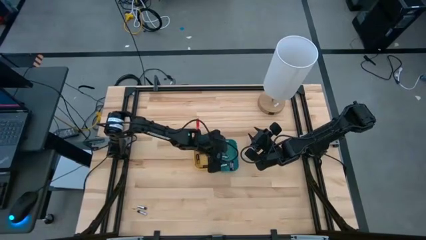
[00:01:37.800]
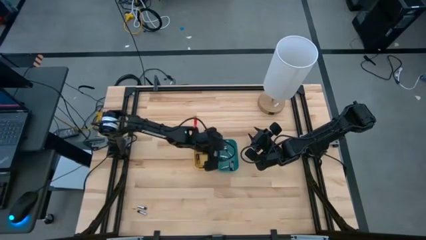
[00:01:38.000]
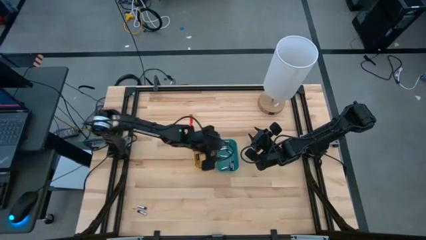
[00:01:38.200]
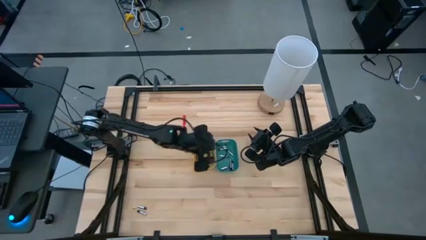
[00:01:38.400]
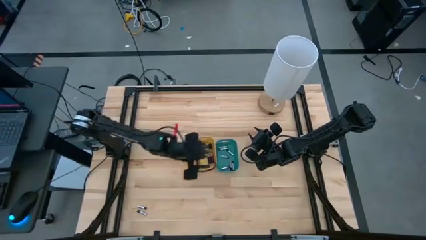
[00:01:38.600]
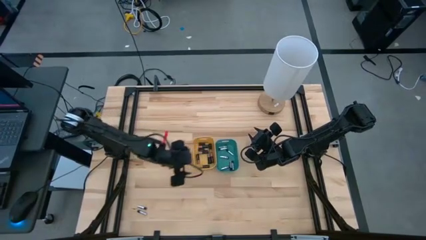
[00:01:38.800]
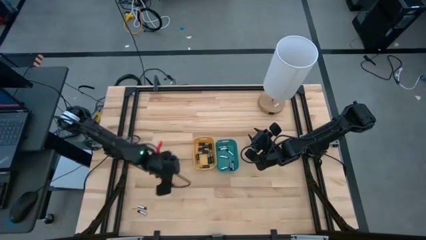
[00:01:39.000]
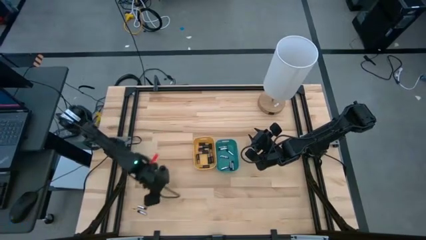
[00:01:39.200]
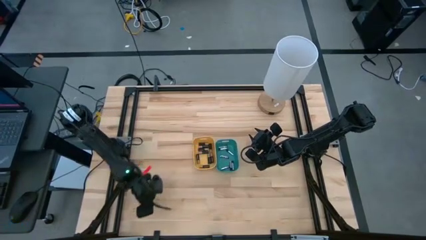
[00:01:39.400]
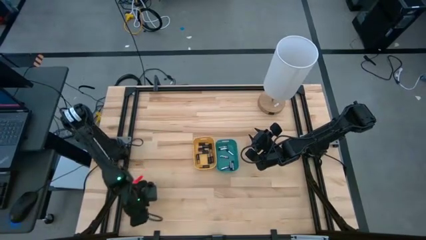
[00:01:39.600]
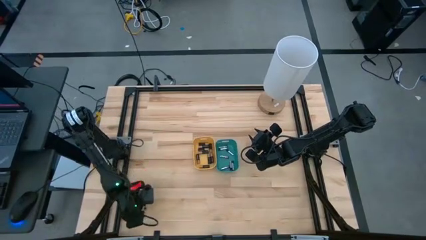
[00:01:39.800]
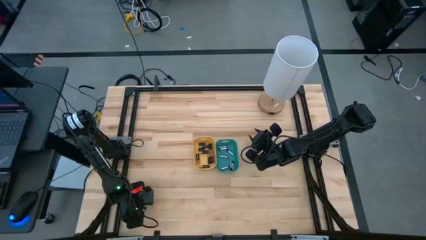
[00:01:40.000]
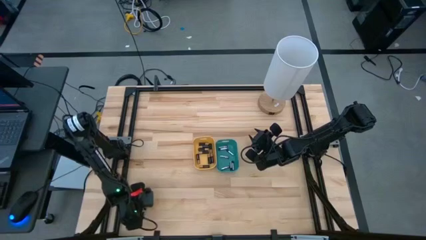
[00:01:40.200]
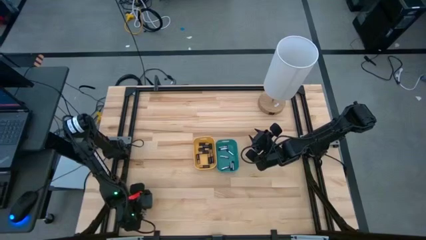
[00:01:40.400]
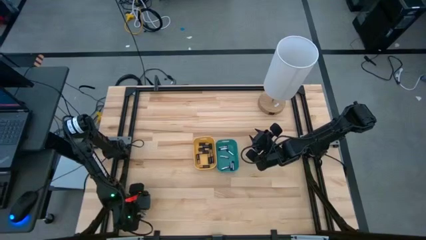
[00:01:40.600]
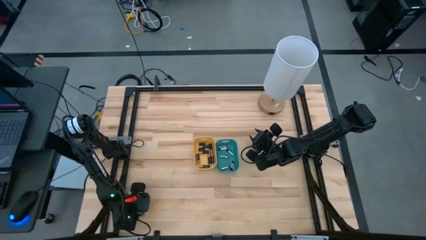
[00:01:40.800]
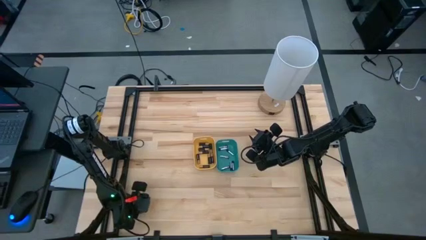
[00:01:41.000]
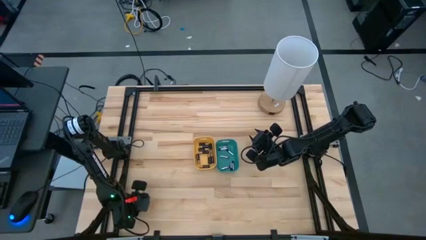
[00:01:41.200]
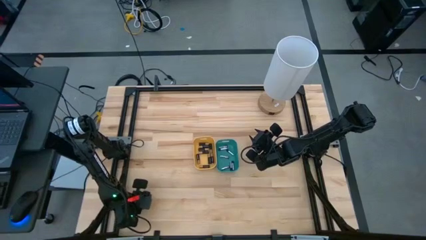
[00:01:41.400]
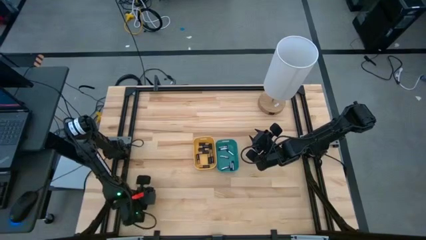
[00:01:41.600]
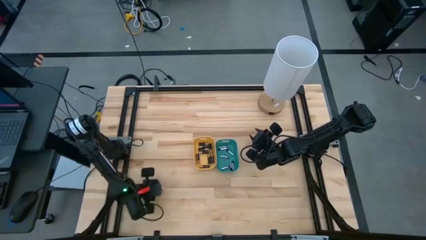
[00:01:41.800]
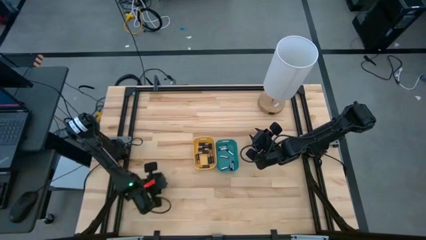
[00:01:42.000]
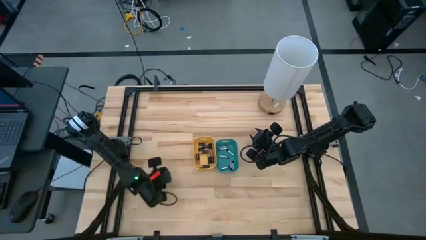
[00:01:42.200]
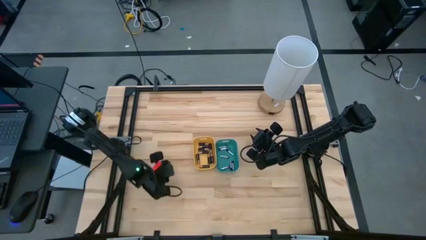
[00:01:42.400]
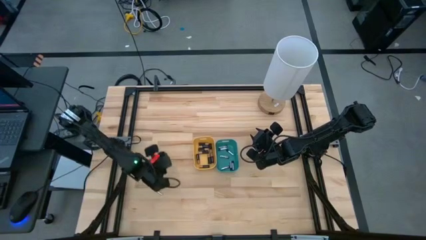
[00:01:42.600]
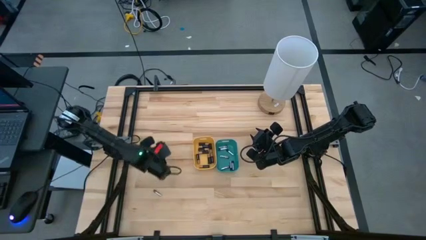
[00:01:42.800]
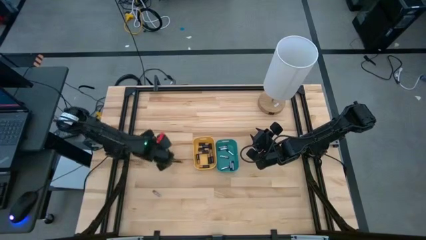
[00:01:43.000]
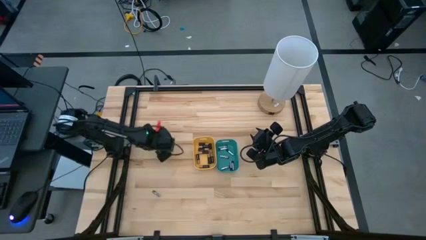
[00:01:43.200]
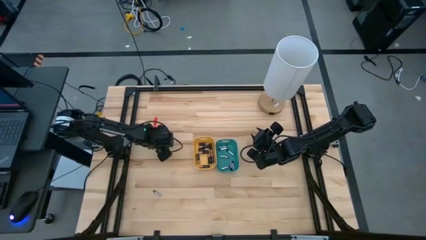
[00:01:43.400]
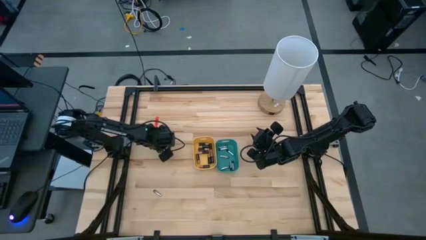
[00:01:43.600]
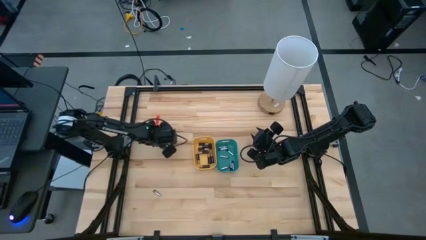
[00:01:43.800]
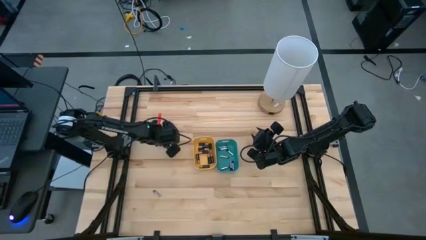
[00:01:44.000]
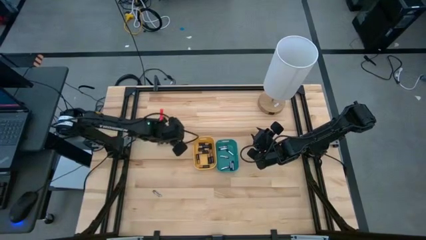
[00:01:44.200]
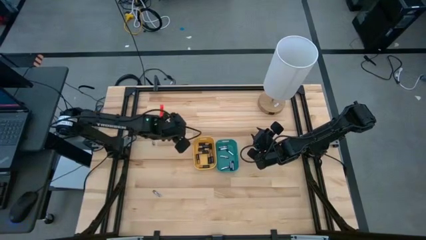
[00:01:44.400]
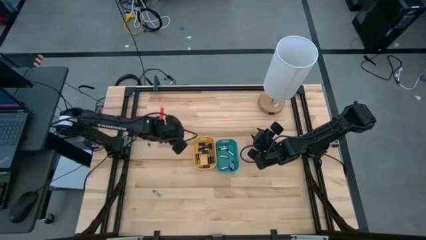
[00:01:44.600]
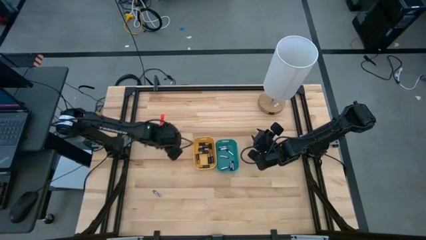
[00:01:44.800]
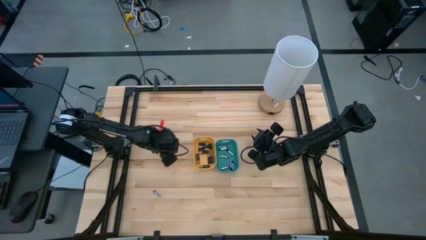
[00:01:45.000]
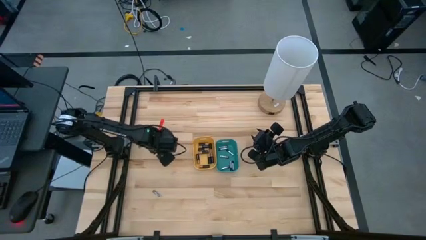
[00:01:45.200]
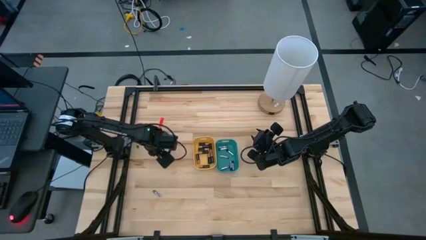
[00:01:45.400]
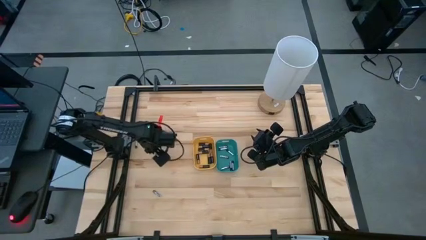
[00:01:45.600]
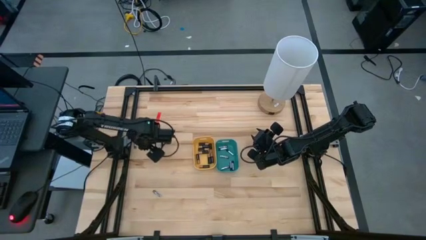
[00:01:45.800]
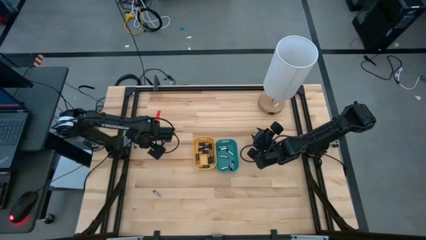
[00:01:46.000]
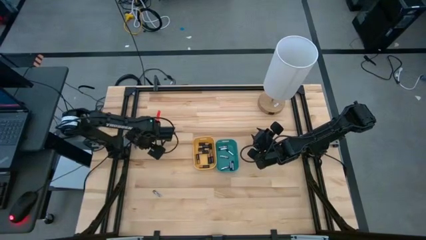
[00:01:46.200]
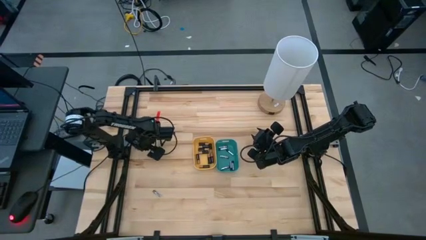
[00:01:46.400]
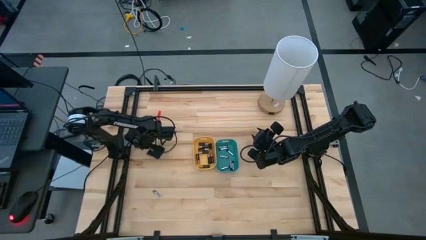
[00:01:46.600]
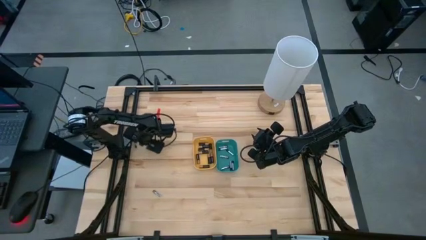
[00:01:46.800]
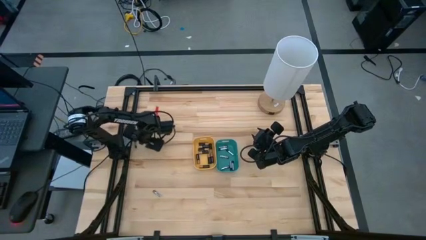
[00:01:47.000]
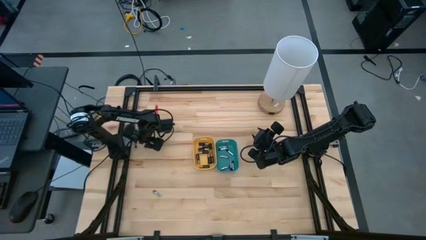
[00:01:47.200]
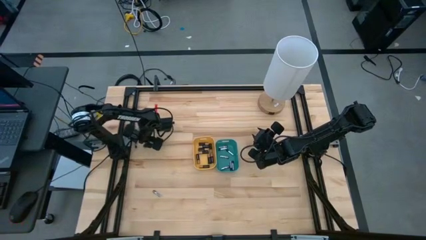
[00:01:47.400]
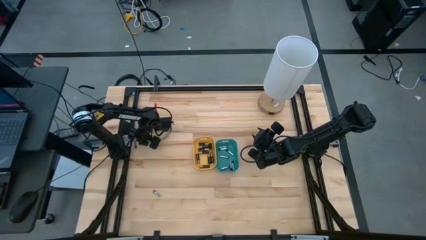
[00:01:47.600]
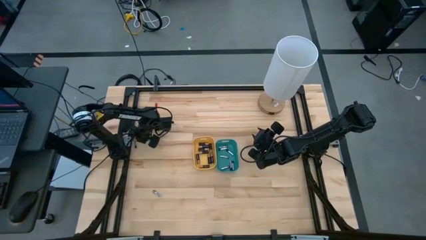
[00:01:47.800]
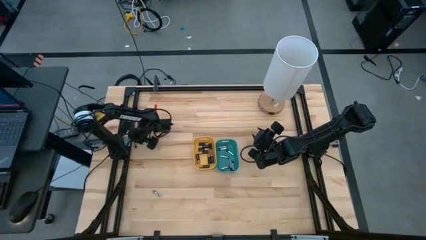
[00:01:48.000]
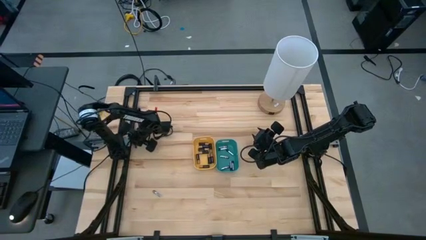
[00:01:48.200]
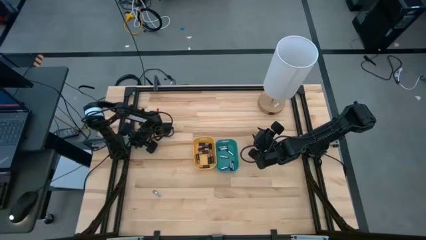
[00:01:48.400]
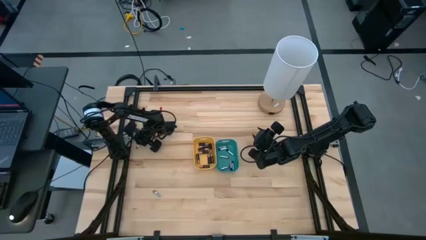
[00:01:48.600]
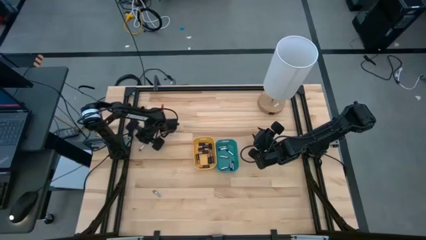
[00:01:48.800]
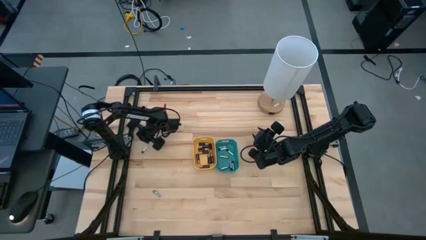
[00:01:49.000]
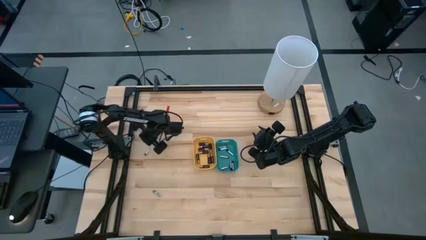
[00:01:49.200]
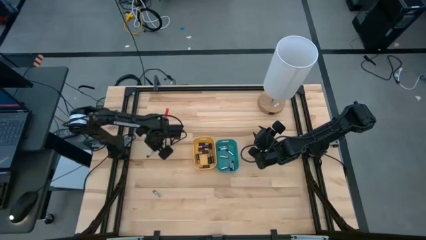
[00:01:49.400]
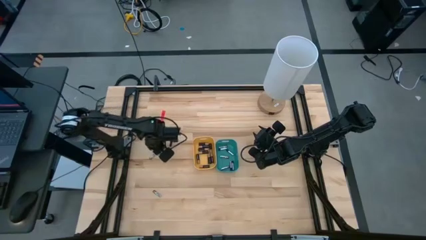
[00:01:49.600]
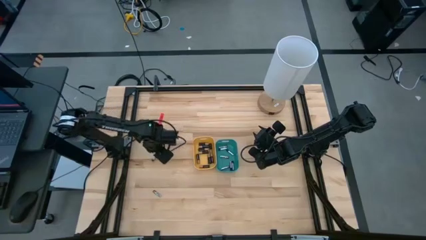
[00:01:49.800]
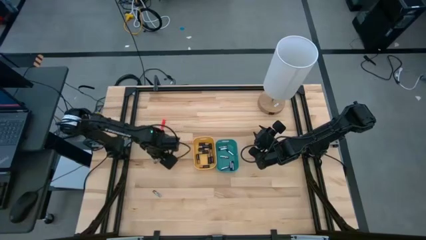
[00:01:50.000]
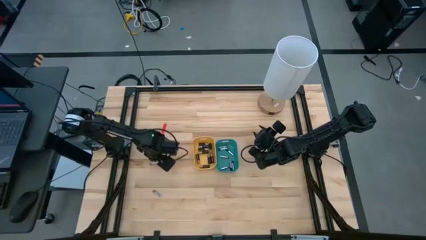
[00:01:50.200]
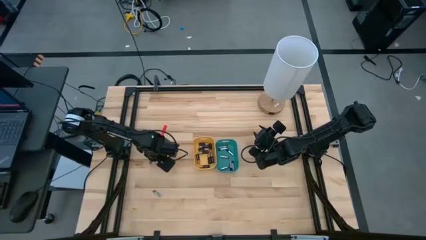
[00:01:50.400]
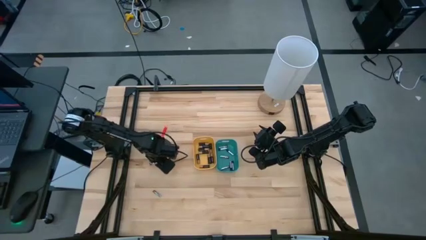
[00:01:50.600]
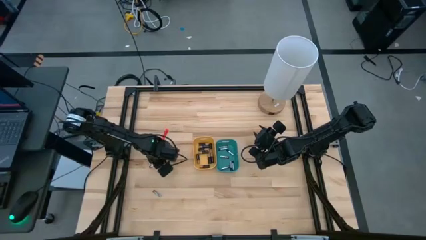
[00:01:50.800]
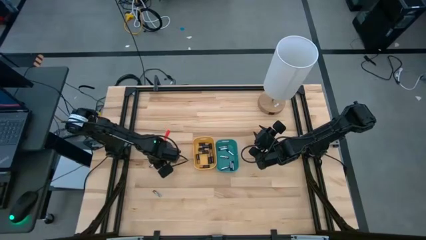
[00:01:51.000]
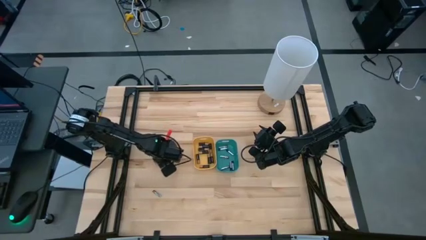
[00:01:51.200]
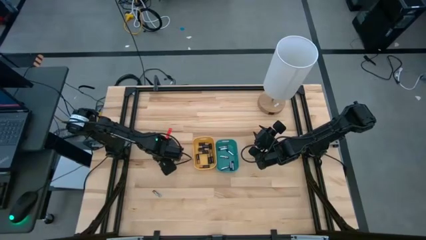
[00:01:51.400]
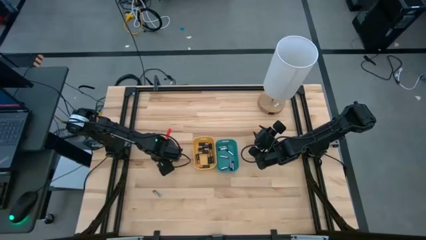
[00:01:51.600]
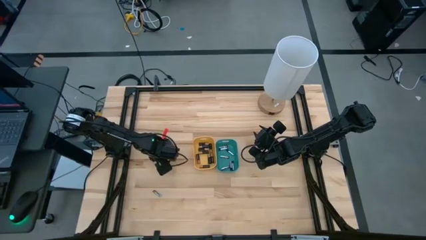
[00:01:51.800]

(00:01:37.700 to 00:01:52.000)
Task: Sort batteries
Put the silver battery into the green bin

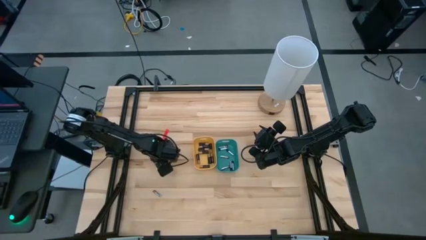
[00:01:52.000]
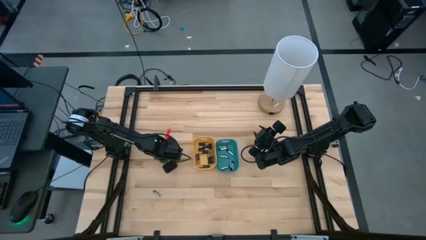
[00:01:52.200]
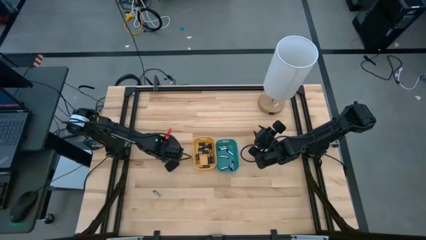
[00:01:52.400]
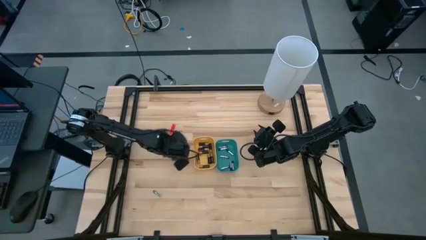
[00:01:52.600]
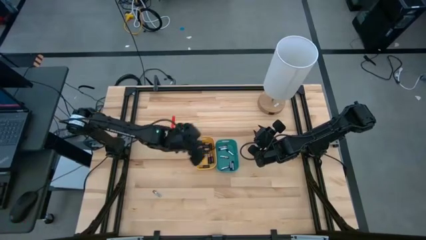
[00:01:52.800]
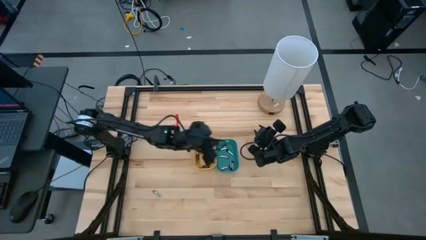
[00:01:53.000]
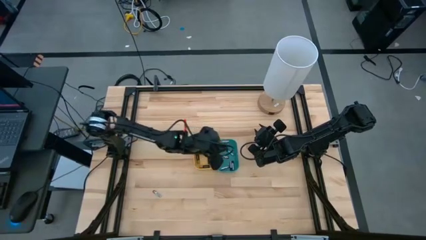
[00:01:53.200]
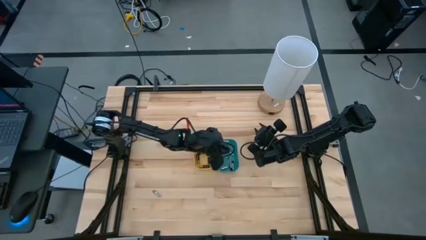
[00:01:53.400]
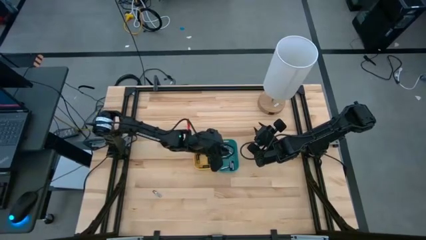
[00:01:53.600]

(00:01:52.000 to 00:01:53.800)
Put the silver battery into the green bin
